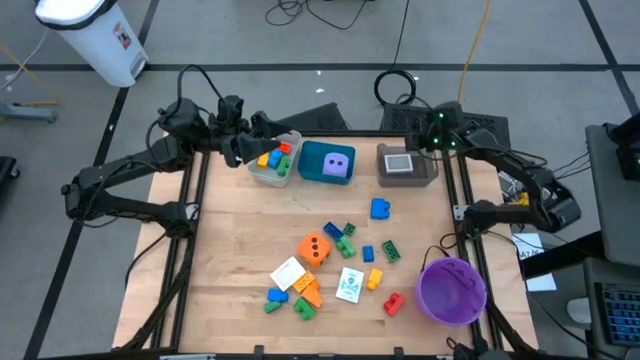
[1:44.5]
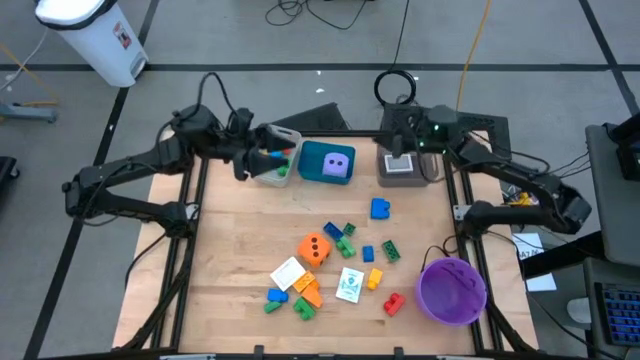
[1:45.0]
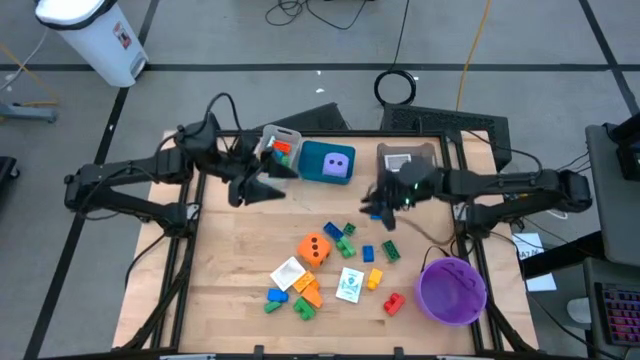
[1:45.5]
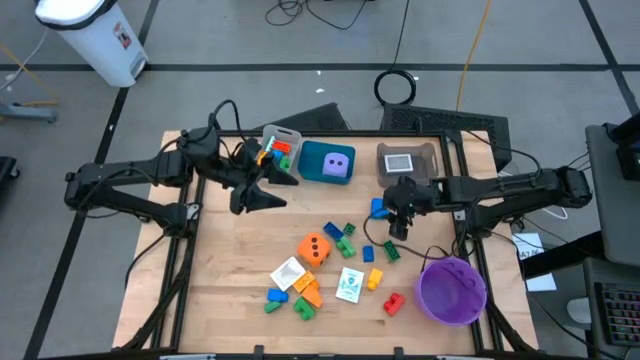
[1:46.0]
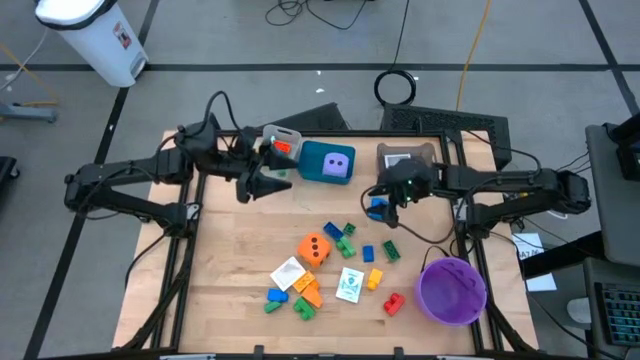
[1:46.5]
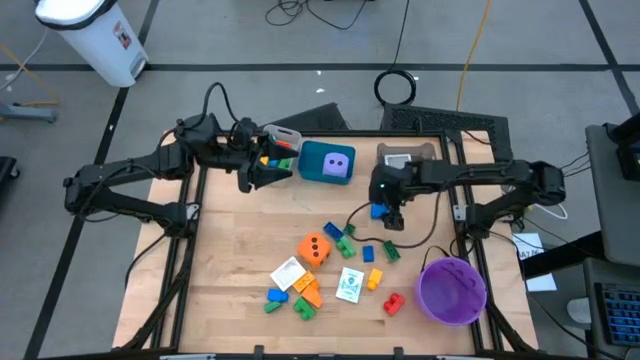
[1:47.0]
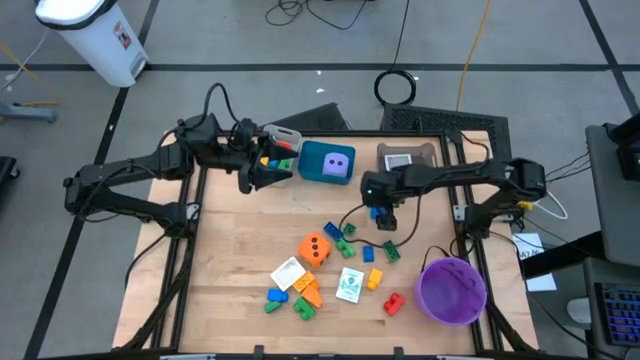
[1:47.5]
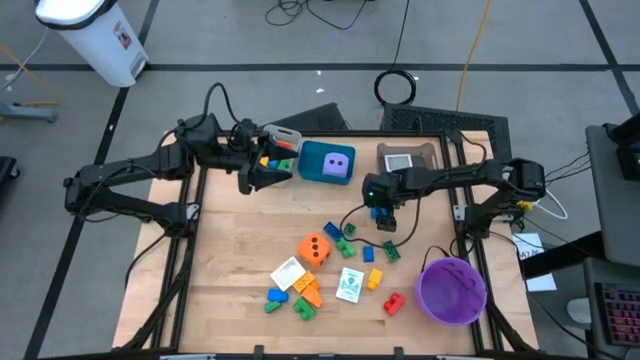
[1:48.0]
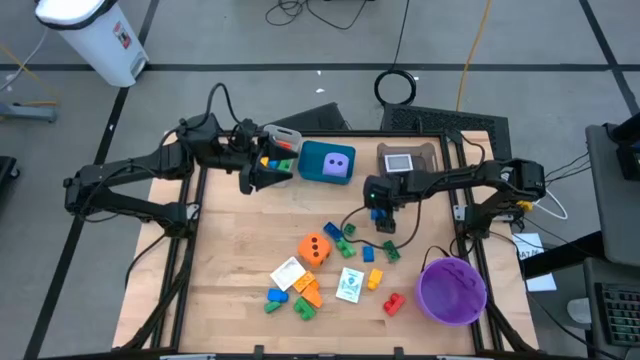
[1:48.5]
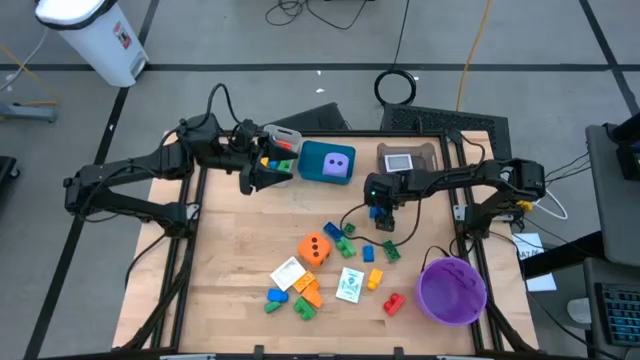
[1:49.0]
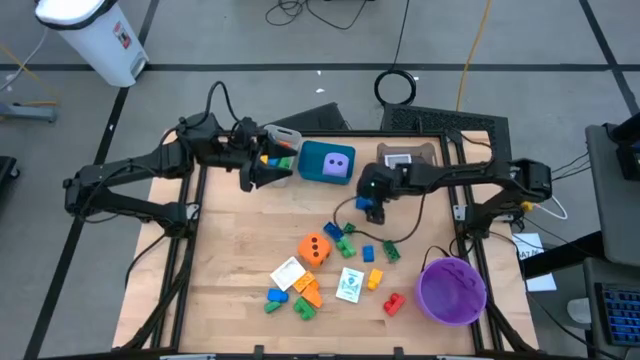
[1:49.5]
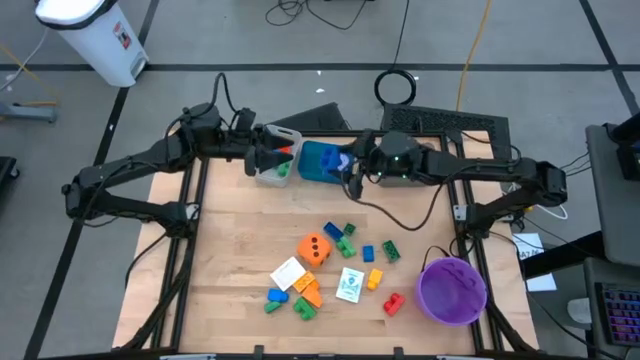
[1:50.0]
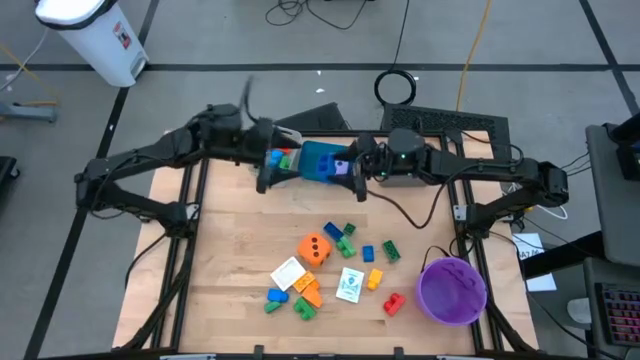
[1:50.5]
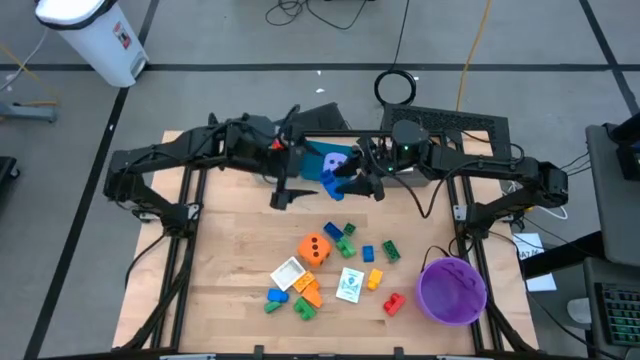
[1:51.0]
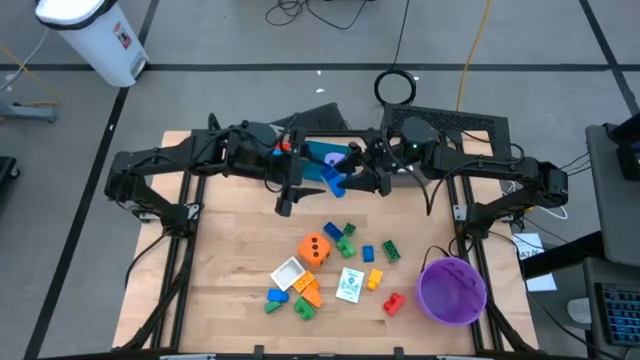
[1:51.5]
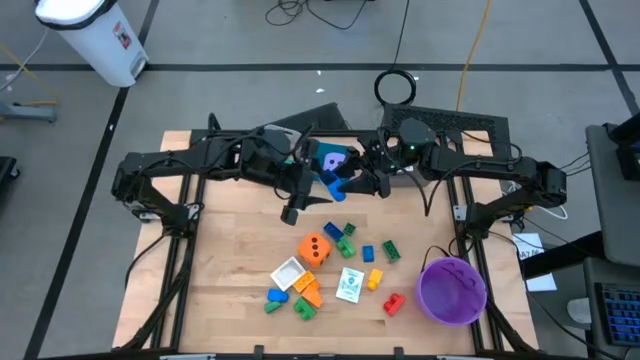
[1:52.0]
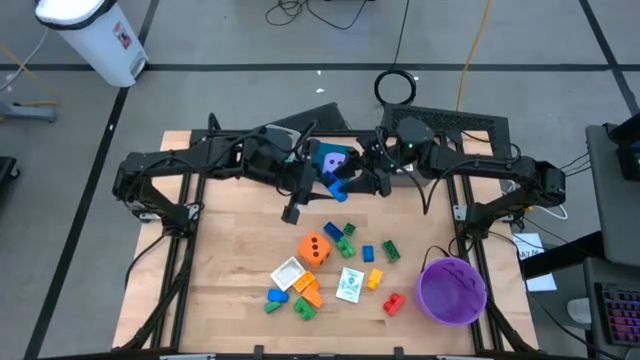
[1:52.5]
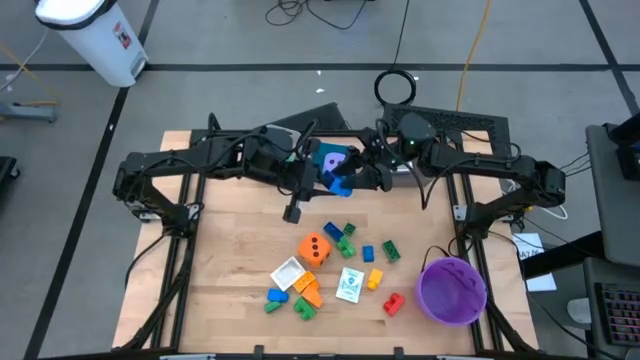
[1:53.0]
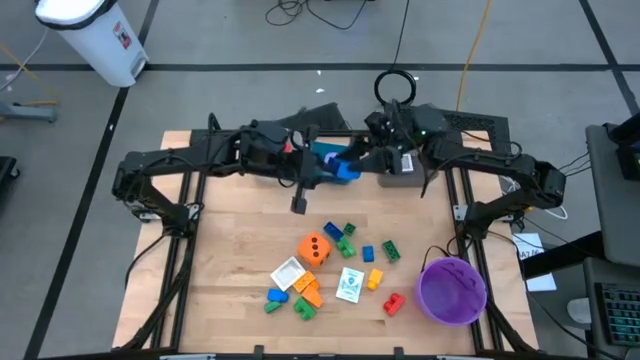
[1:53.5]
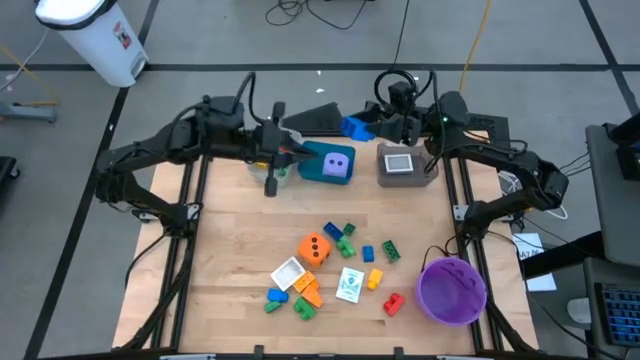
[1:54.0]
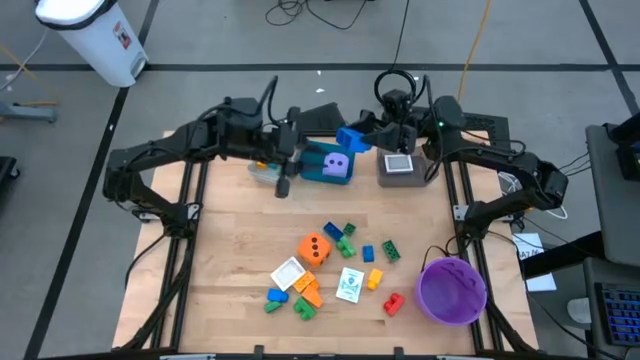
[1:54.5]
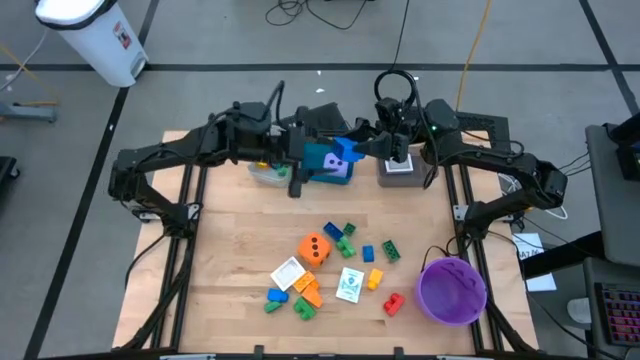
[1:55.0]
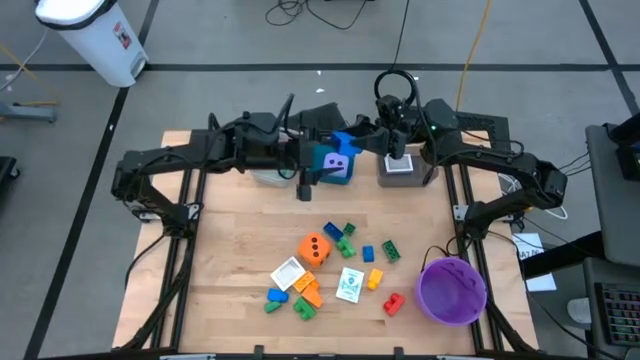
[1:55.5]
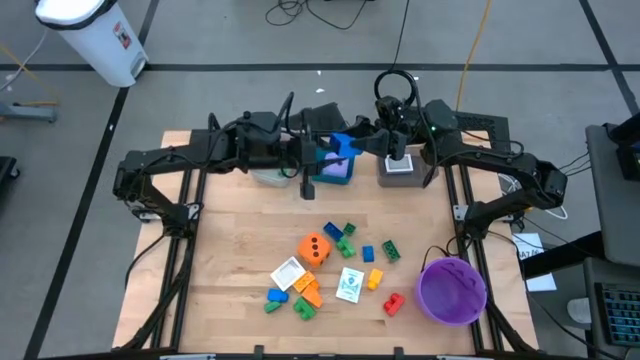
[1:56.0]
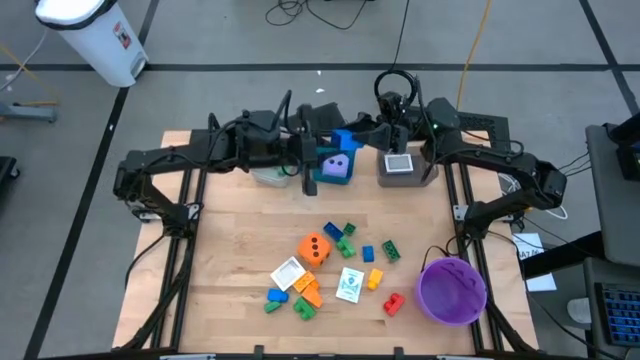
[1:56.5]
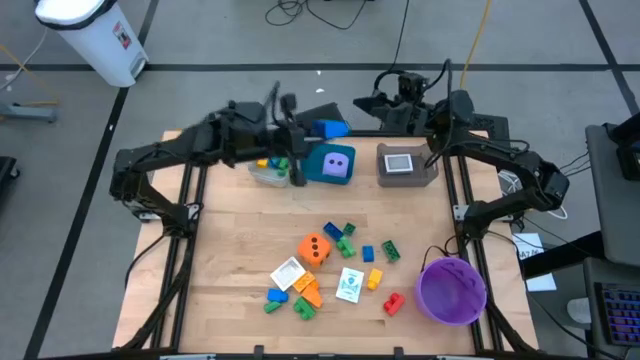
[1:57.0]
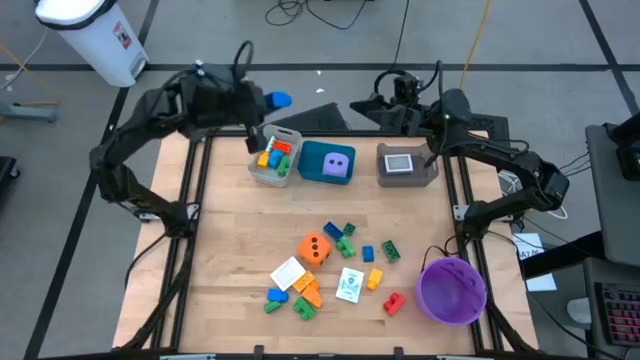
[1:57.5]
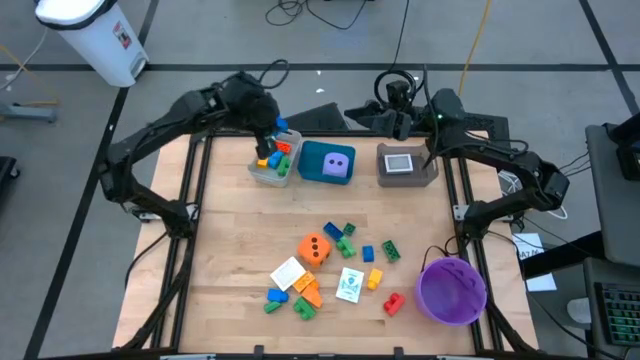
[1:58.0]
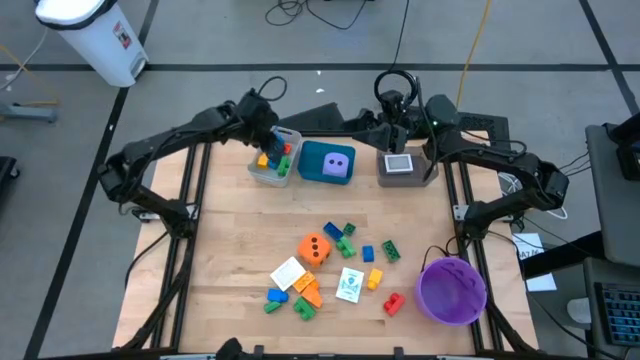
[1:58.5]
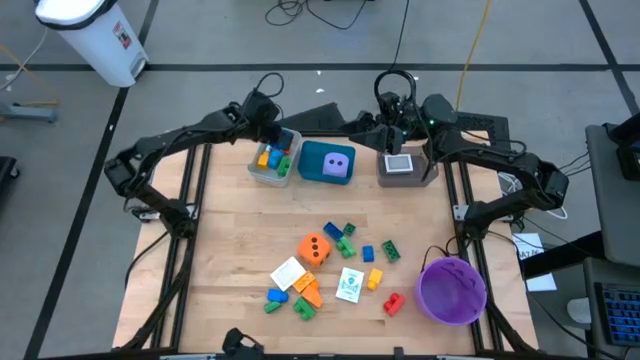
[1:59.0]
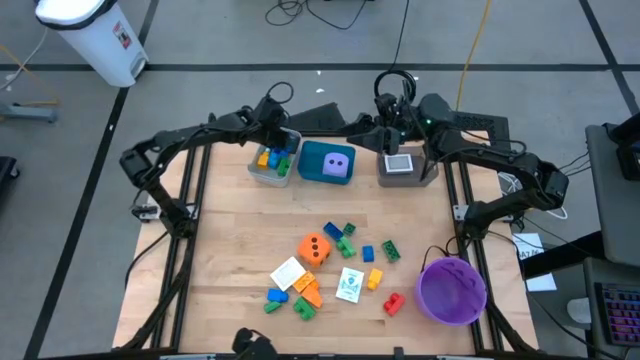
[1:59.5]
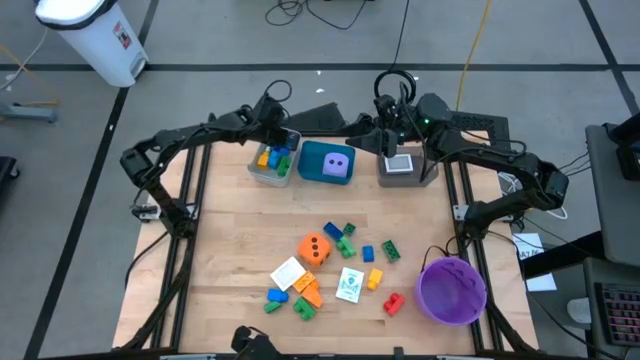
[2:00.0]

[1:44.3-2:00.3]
Task: Pick & Place Toys
Put the blue game piece into the gray bin
